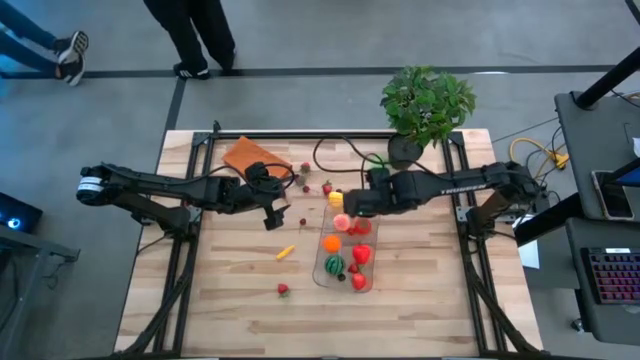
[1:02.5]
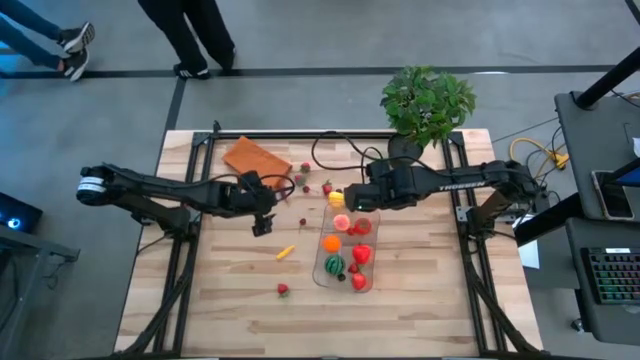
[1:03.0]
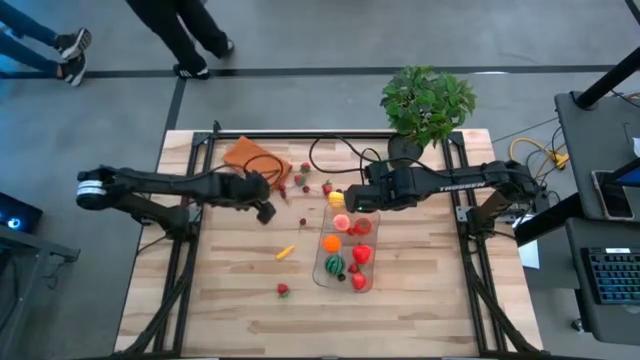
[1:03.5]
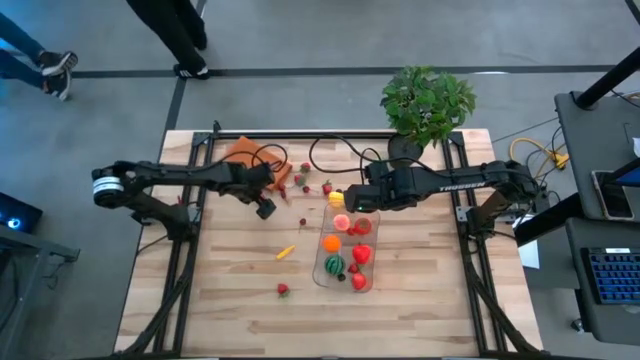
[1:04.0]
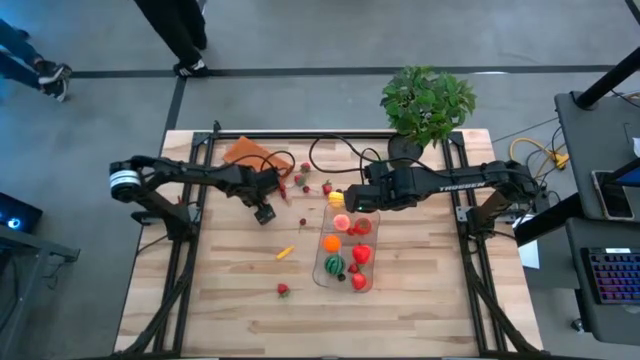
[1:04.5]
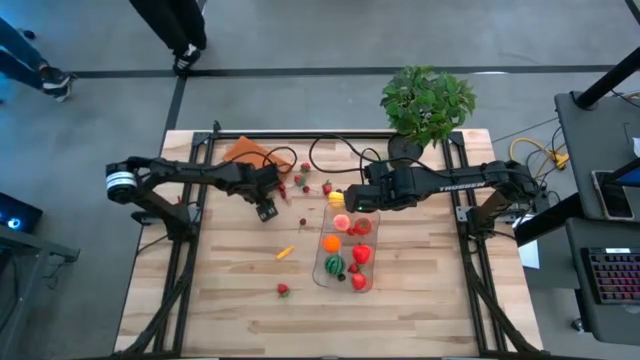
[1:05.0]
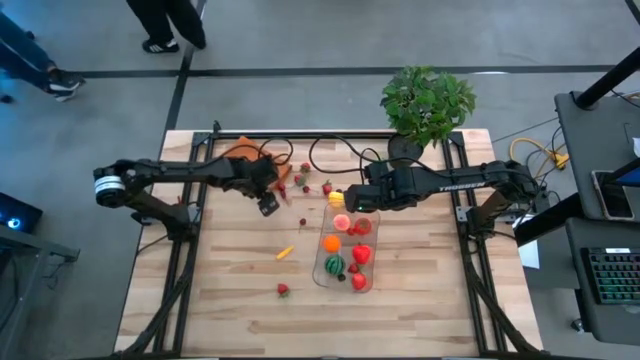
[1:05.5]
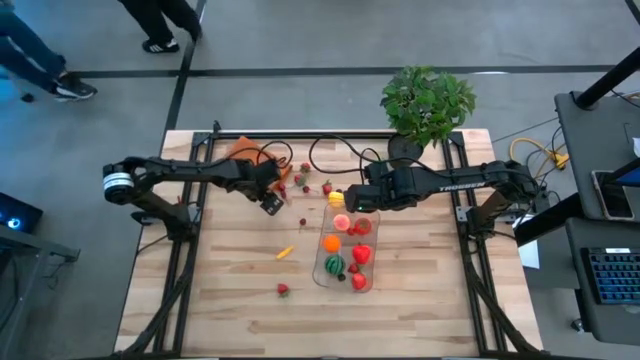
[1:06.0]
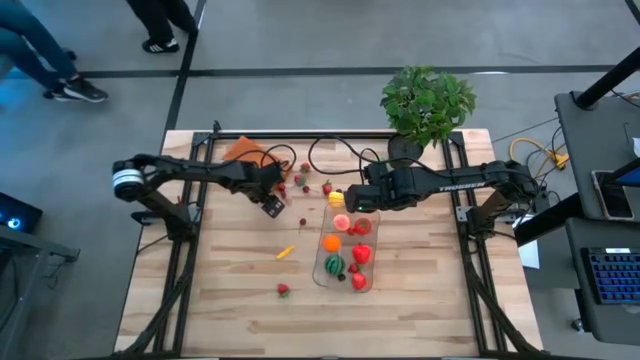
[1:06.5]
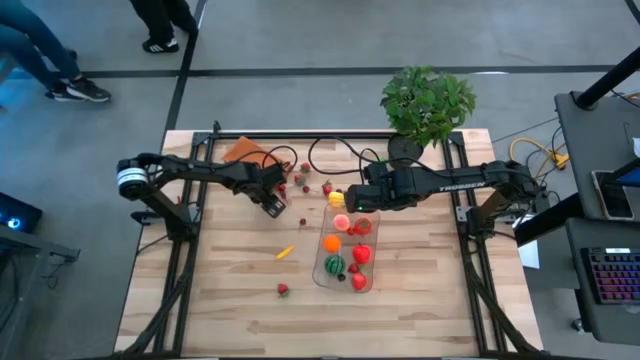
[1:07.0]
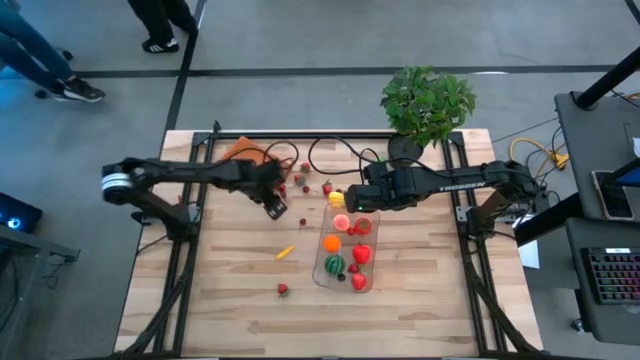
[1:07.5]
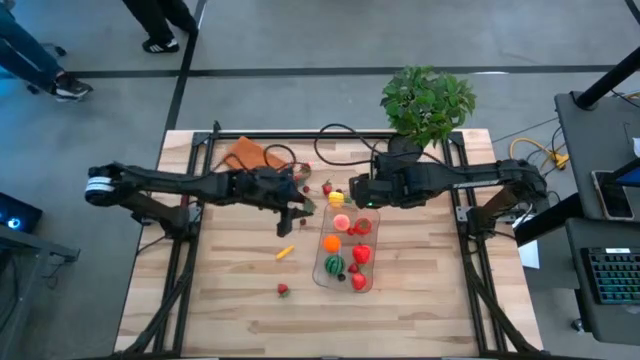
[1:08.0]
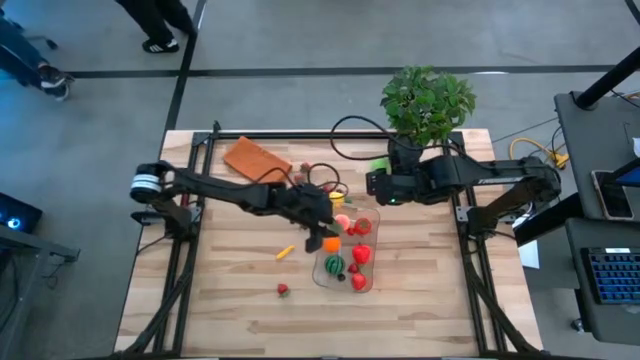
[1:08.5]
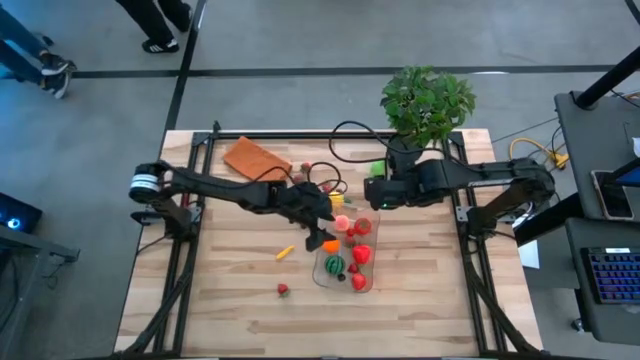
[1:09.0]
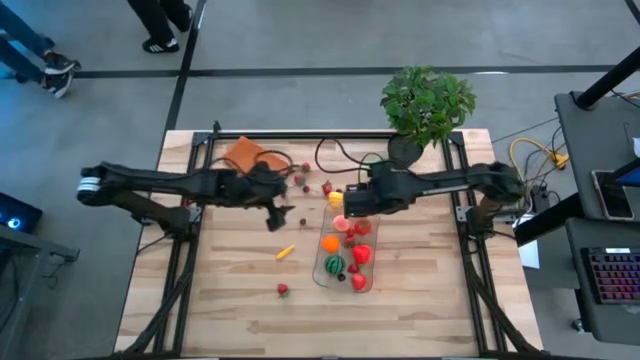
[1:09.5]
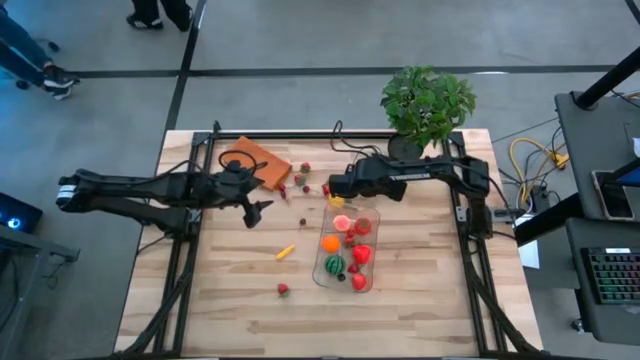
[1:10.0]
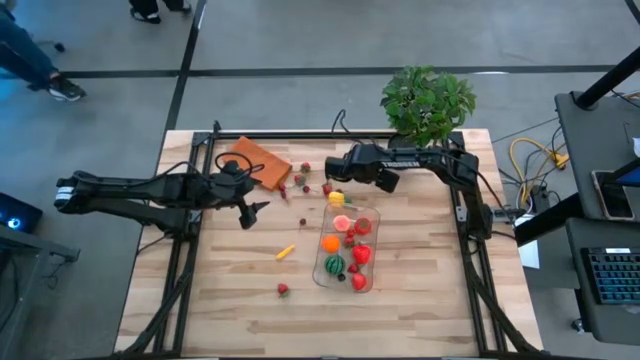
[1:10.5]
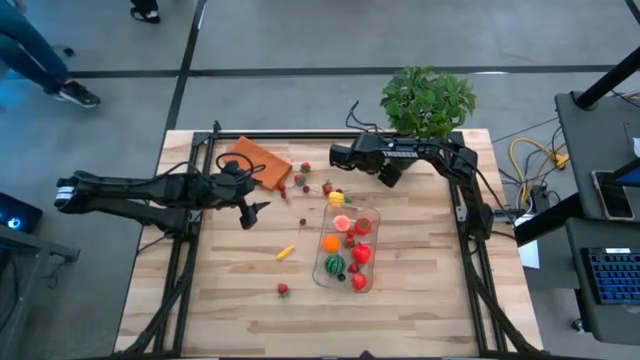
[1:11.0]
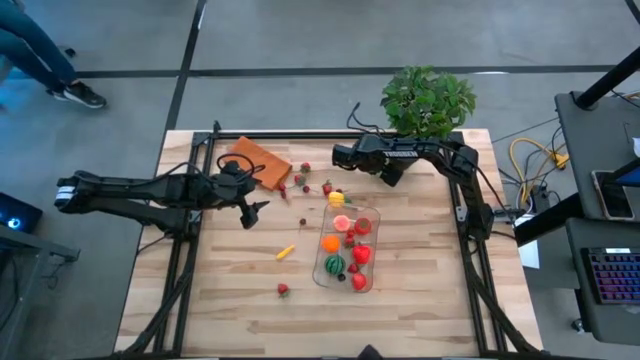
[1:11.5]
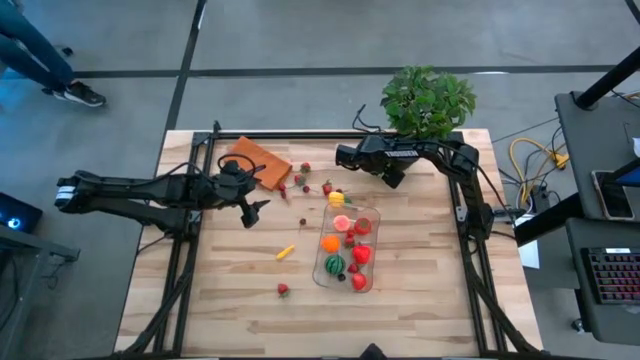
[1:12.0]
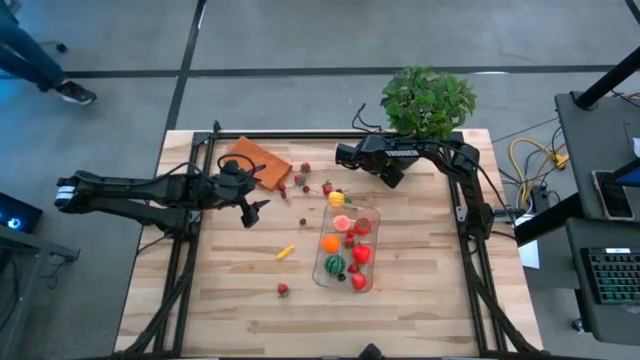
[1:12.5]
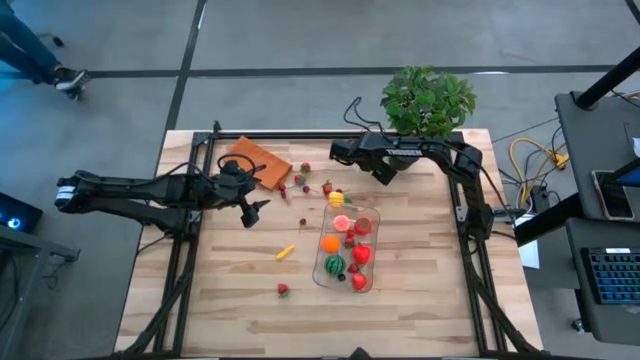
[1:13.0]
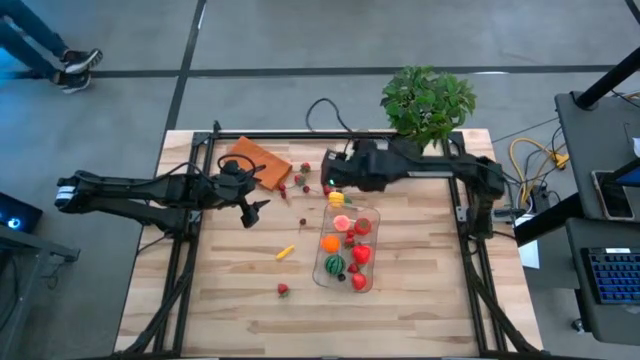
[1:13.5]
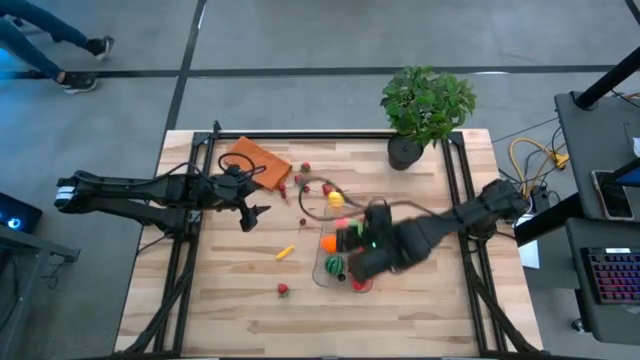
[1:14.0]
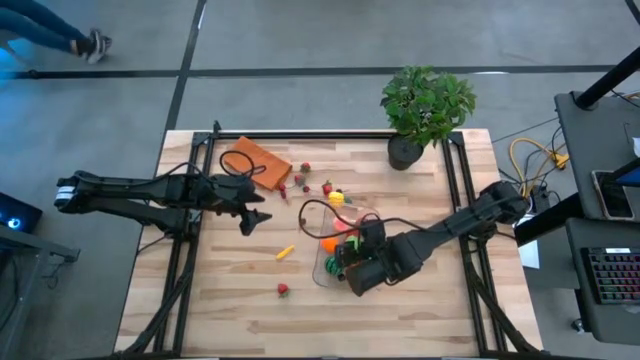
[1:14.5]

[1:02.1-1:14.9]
Task: Pick and placing Produce into tupperware
Put the strawberry into the transparent bin

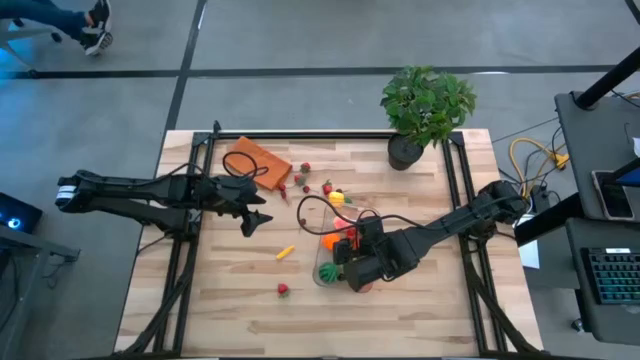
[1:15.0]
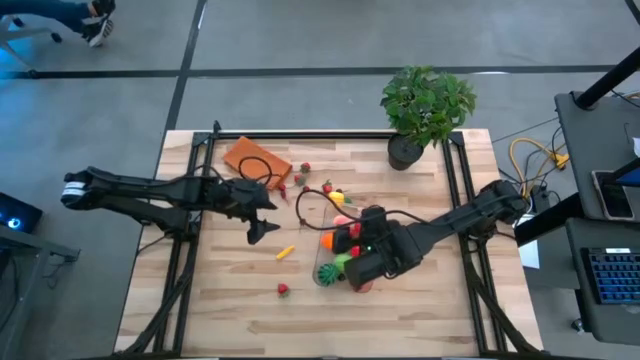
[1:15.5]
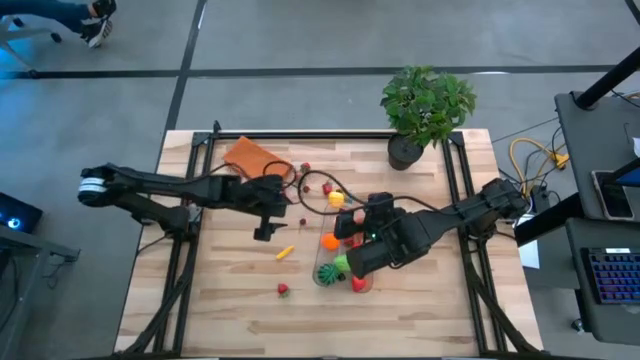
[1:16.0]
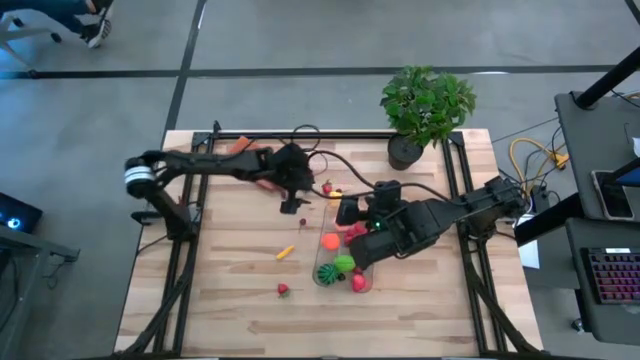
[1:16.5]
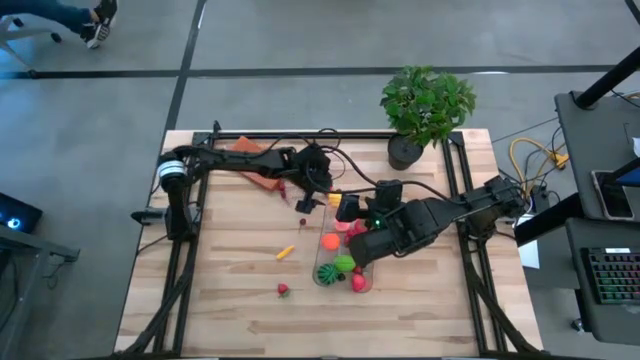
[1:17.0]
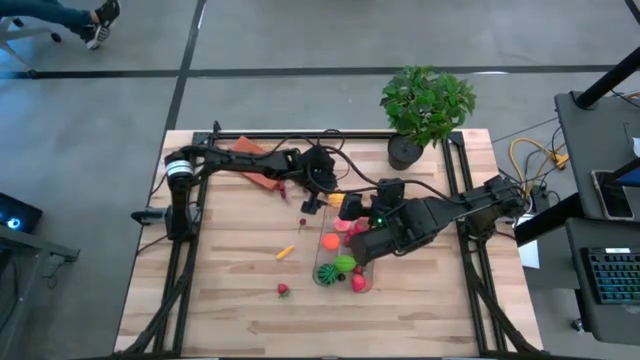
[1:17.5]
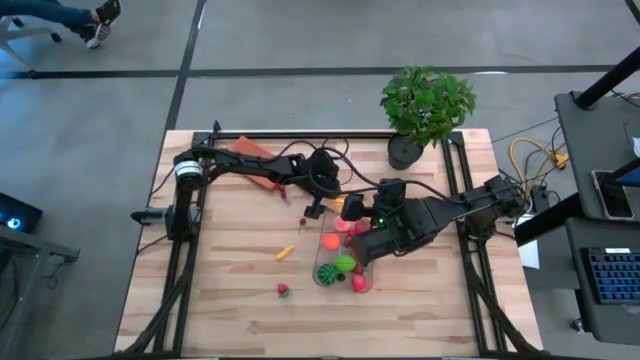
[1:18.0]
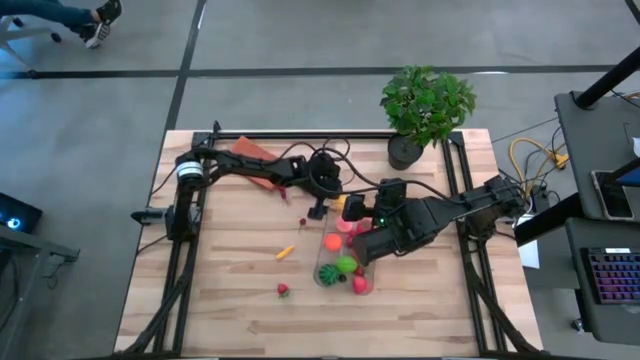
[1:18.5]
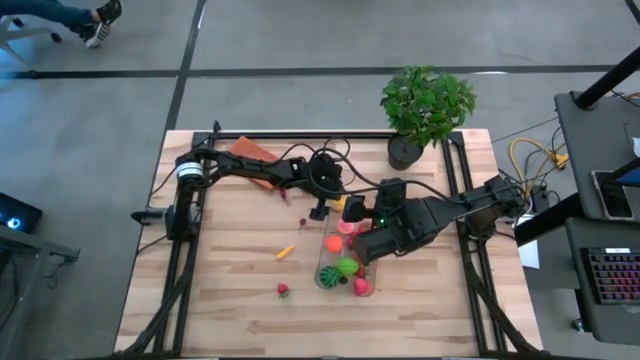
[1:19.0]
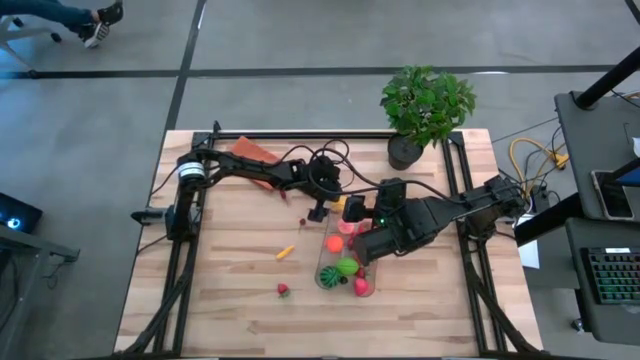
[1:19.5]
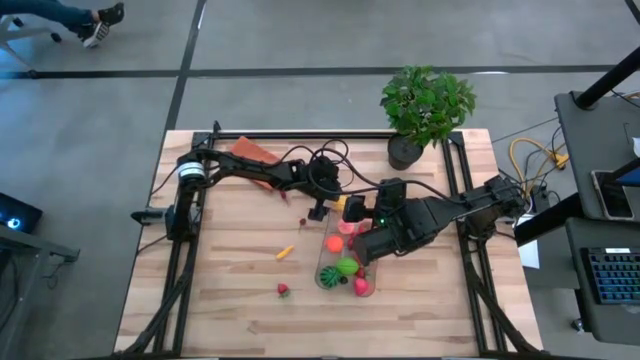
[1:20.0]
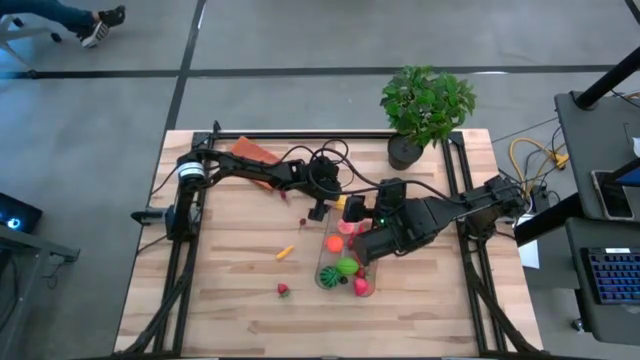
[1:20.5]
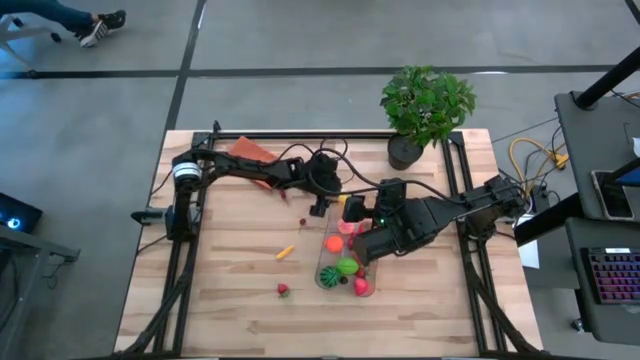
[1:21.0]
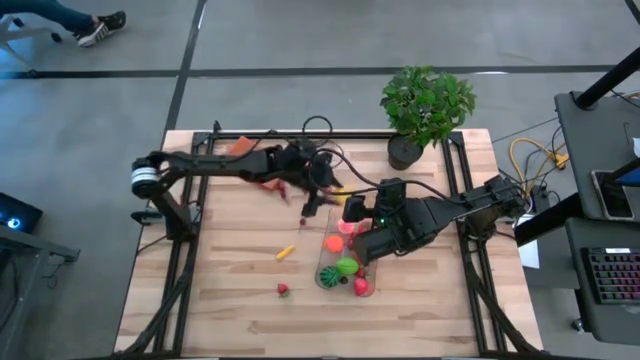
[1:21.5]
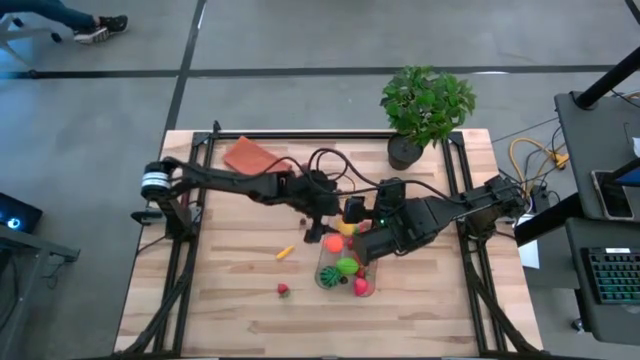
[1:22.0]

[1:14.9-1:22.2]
Put the pineapple into the transparent bin
